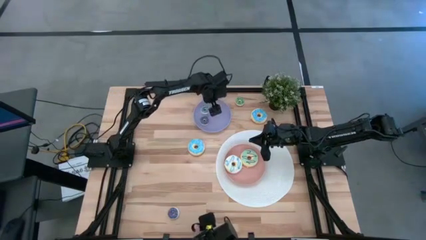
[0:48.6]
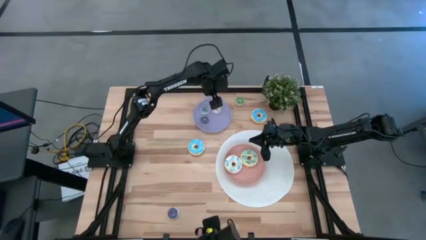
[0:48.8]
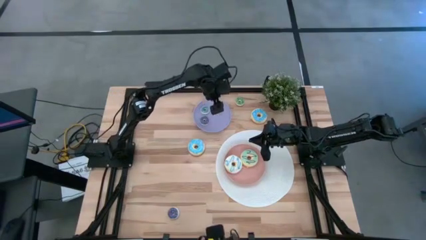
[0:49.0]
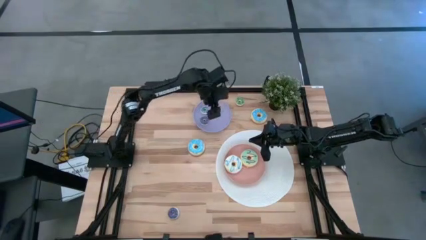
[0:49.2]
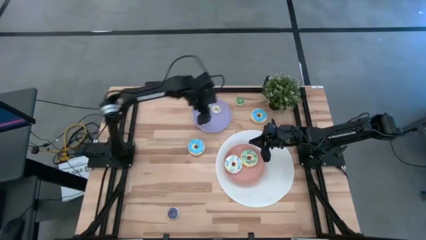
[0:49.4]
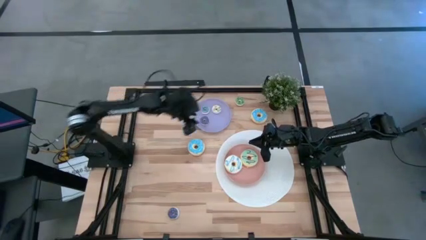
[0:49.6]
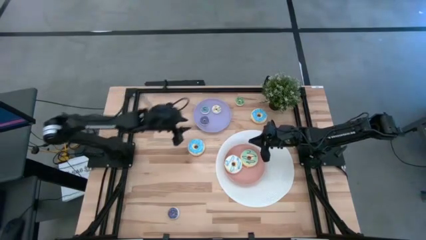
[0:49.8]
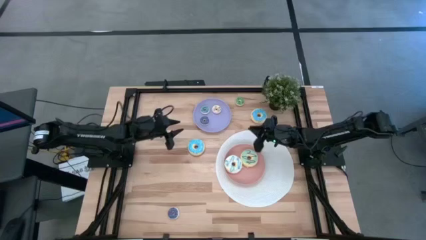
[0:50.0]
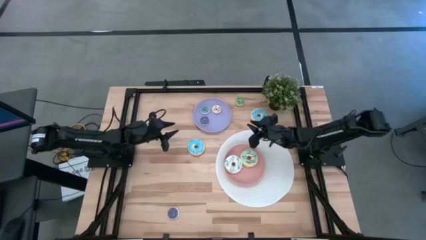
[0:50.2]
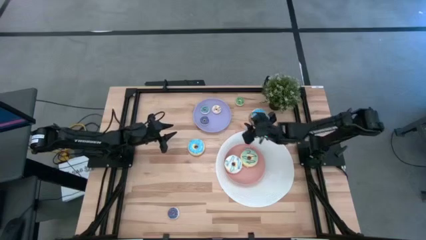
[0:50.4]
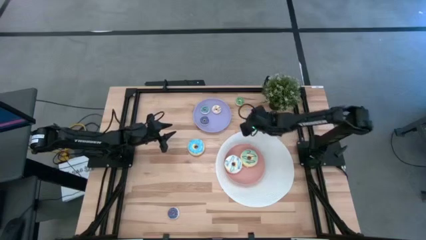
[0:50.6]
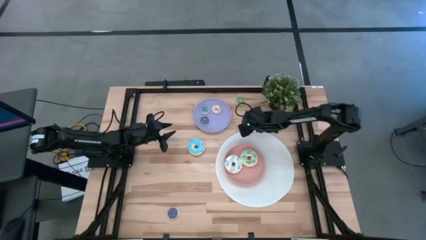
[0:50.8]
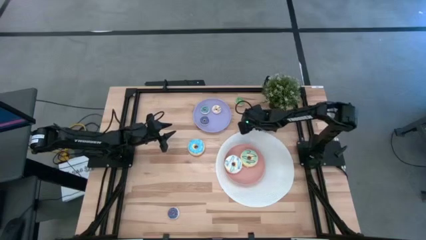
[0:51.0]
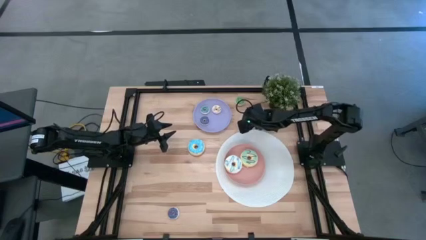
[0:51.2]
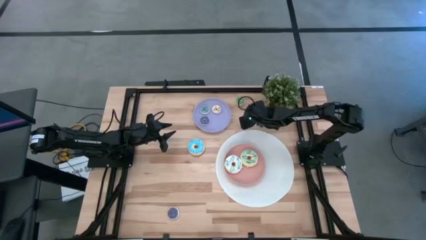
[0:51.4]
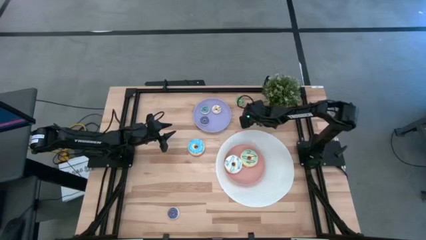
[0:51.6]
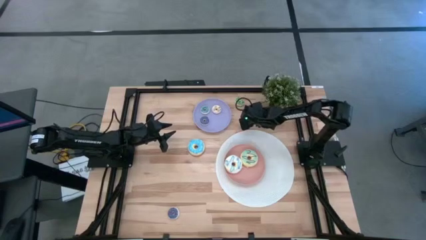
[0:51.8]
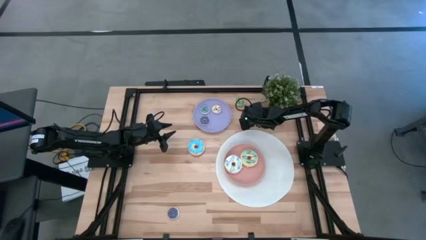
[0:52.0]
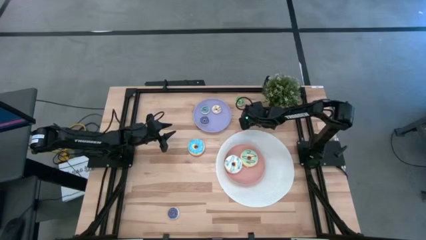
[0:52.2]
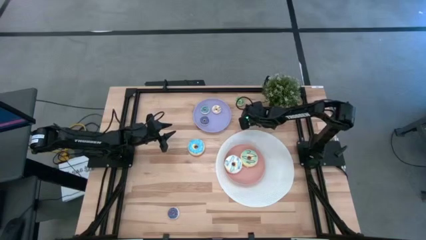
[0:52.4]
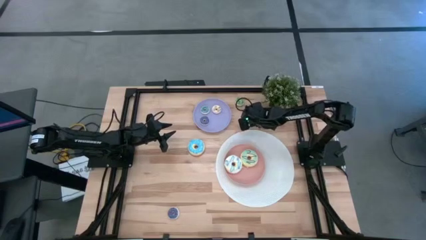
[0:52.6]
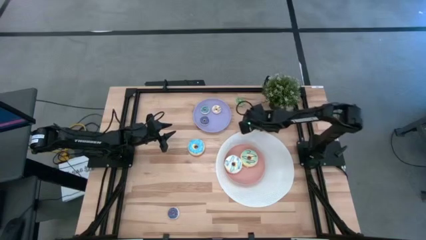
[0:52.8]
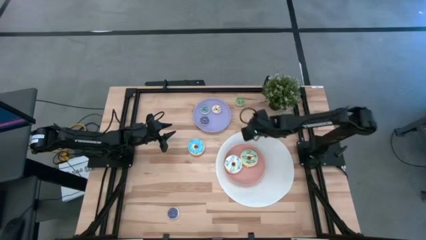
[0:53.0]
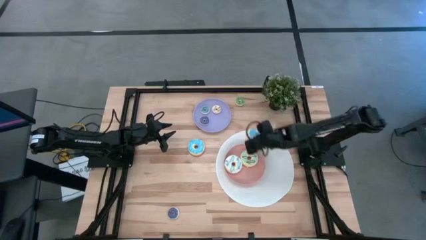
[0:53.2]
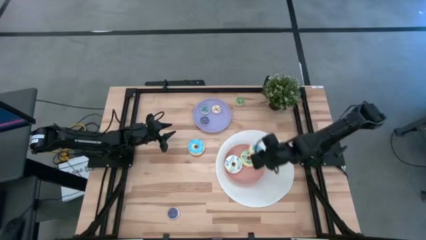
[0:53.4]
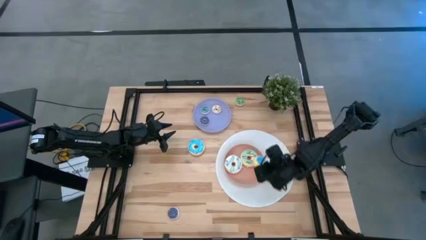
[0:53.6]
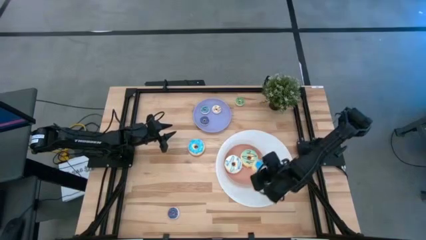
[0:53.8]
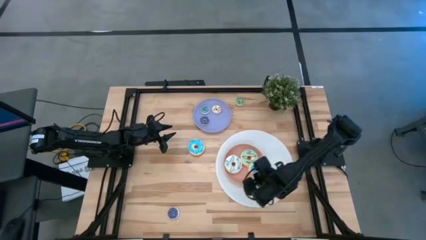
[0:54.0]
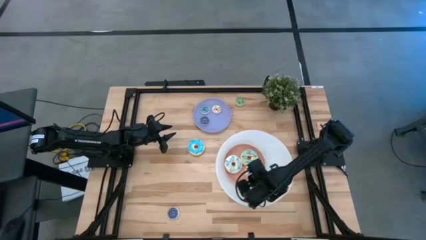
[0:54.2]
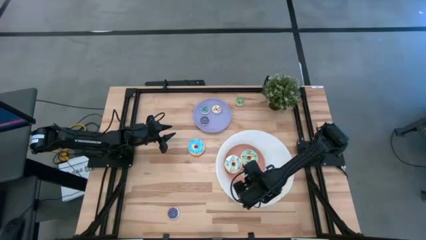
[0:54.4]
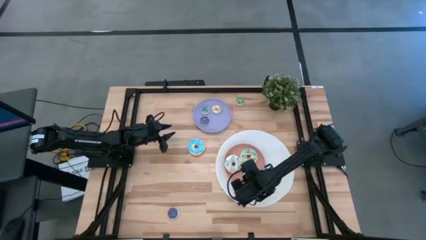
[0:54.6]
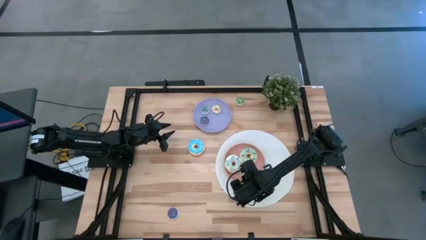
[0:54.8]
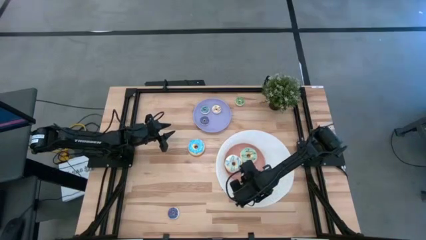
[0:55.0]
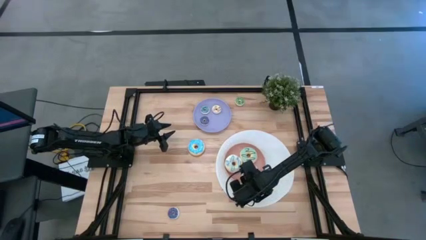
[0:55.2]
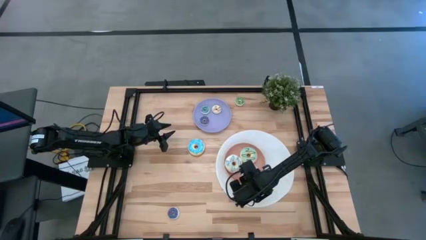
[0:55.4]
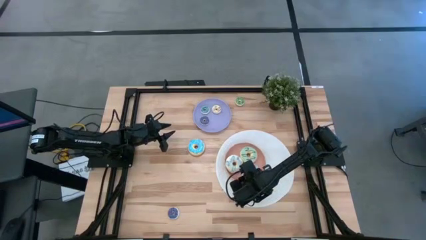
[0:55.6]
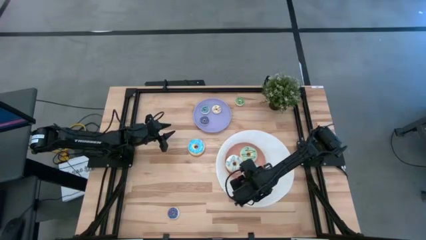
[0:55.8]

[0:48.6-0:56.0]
Task: Pick & Place donuts
Put the right big blue donut on the orange plate

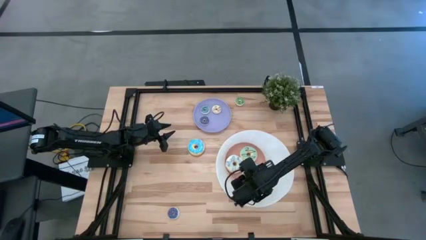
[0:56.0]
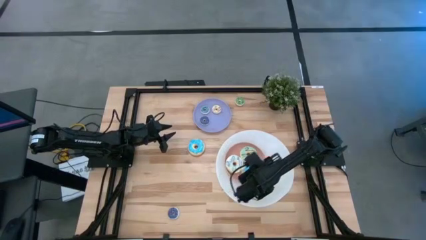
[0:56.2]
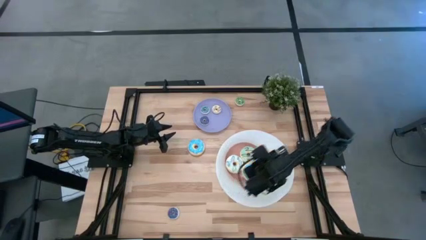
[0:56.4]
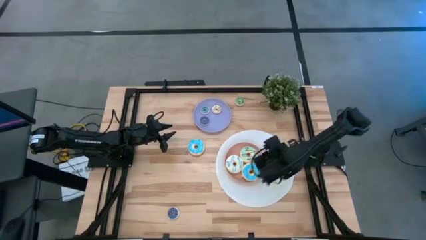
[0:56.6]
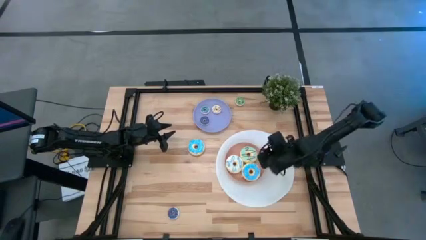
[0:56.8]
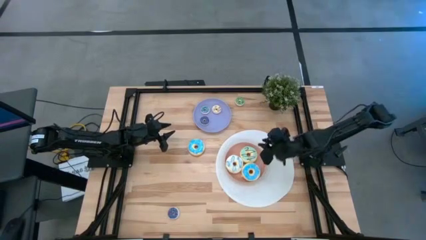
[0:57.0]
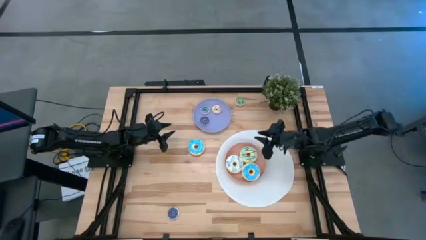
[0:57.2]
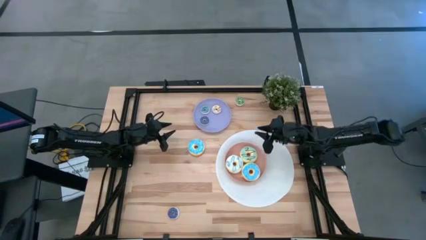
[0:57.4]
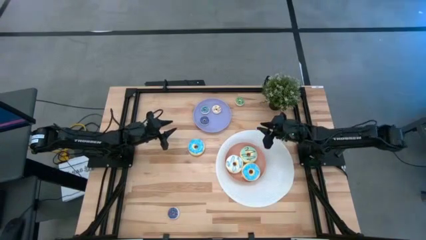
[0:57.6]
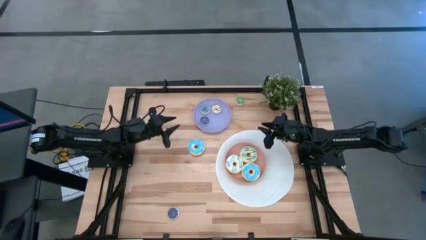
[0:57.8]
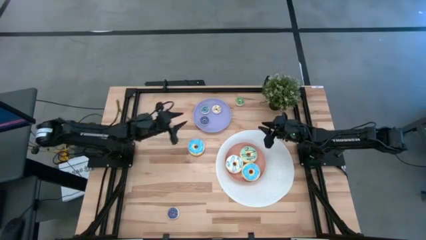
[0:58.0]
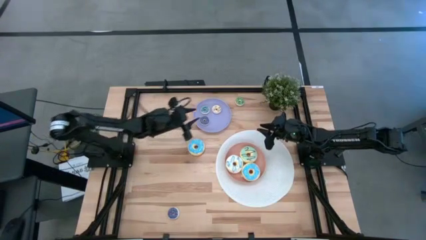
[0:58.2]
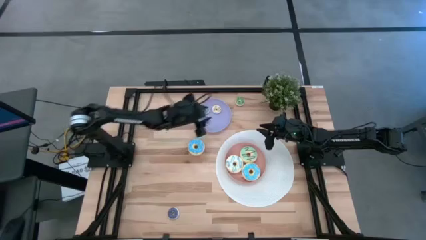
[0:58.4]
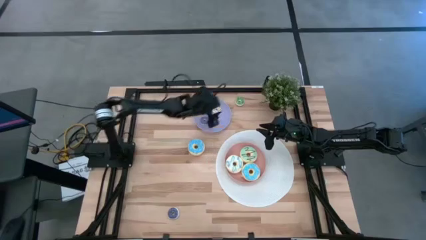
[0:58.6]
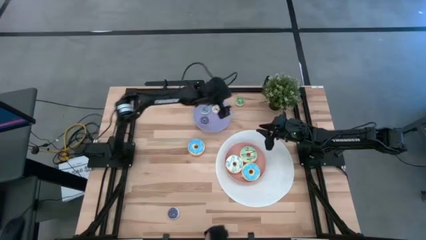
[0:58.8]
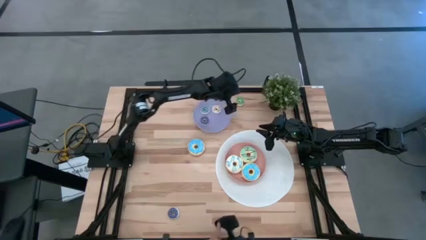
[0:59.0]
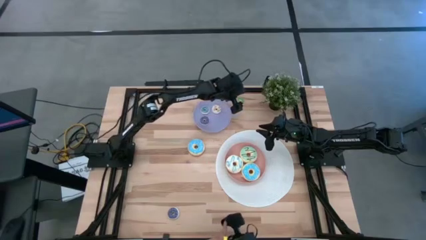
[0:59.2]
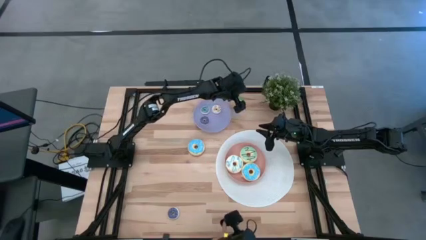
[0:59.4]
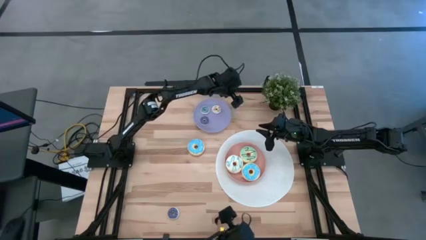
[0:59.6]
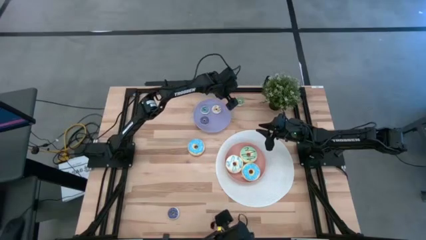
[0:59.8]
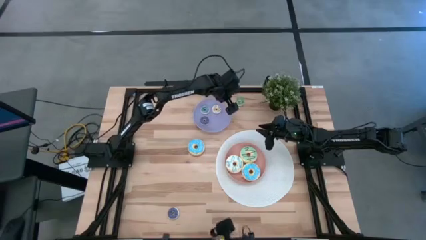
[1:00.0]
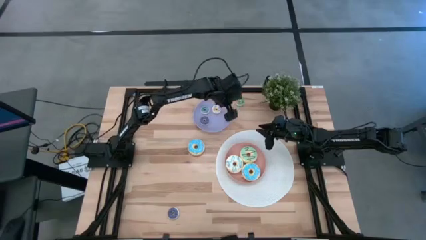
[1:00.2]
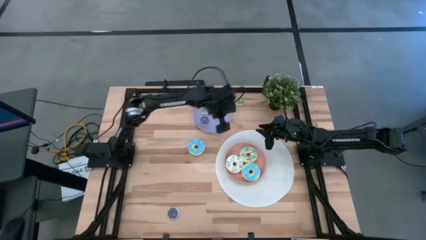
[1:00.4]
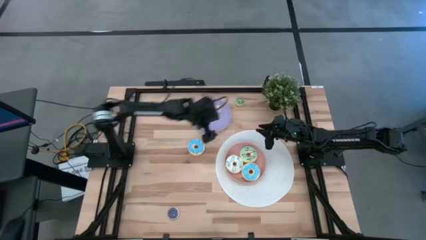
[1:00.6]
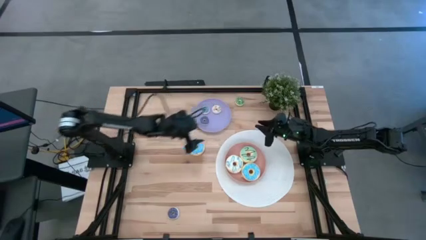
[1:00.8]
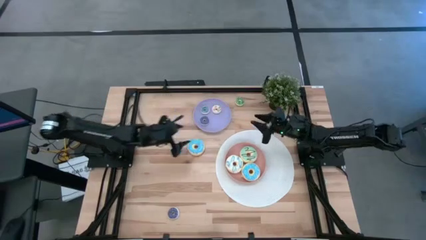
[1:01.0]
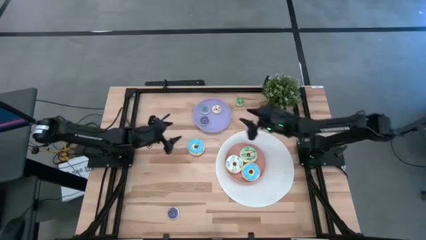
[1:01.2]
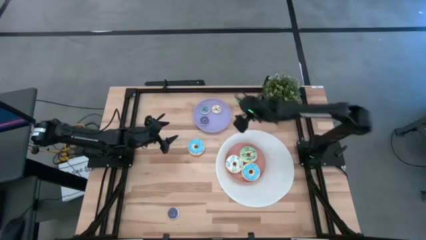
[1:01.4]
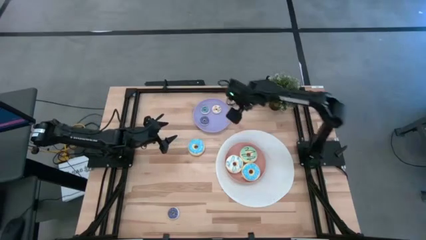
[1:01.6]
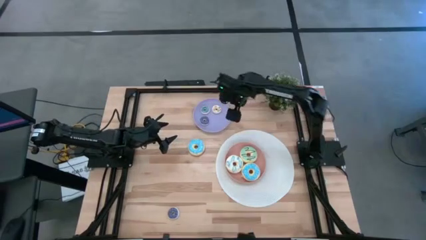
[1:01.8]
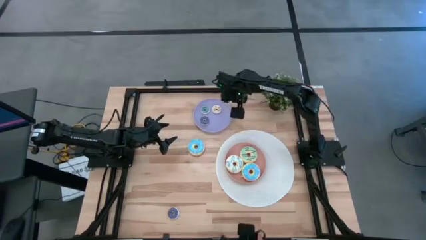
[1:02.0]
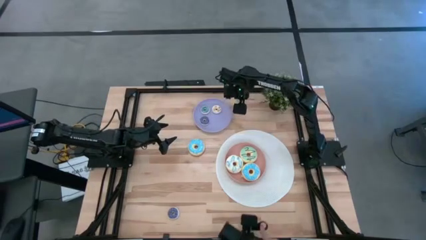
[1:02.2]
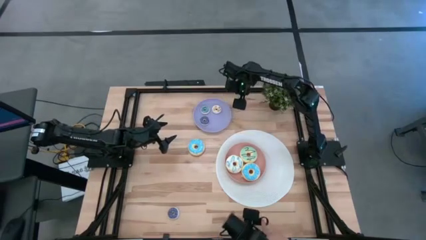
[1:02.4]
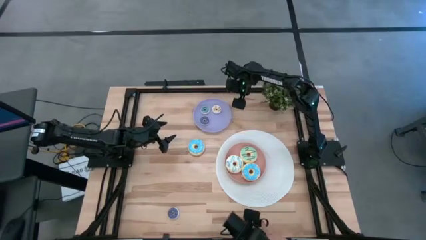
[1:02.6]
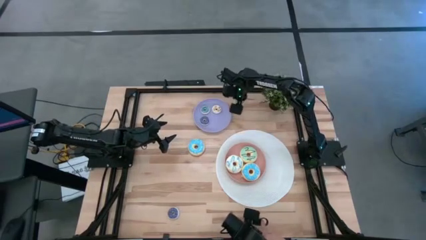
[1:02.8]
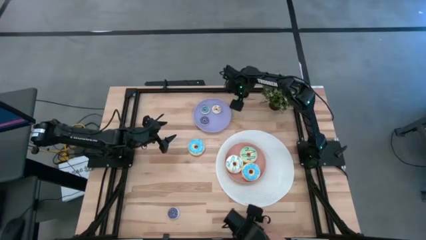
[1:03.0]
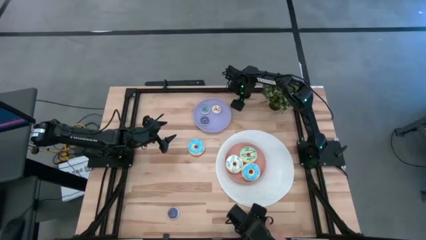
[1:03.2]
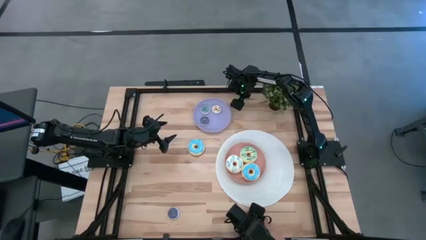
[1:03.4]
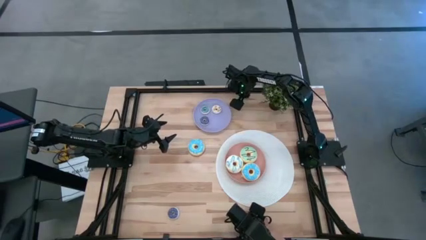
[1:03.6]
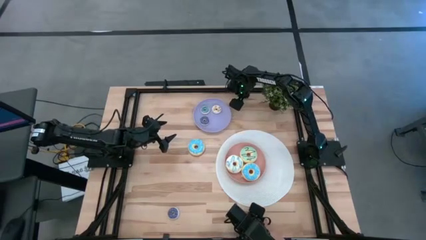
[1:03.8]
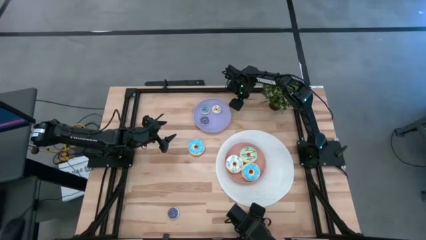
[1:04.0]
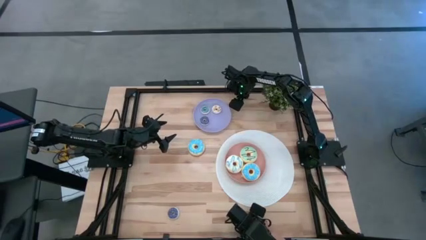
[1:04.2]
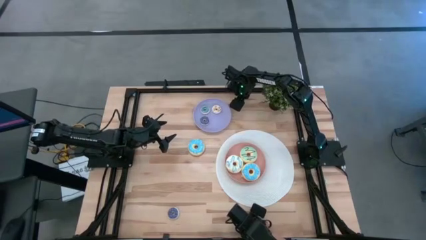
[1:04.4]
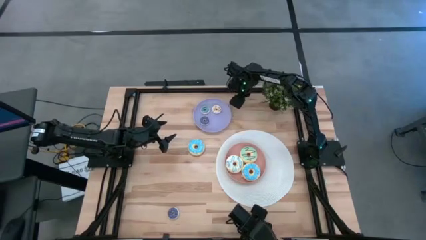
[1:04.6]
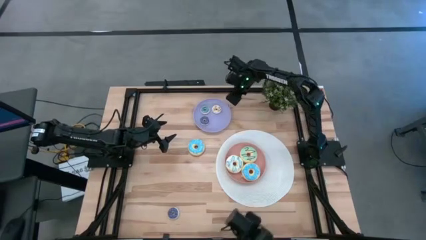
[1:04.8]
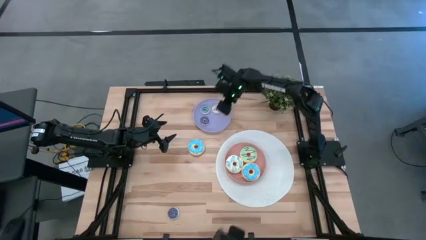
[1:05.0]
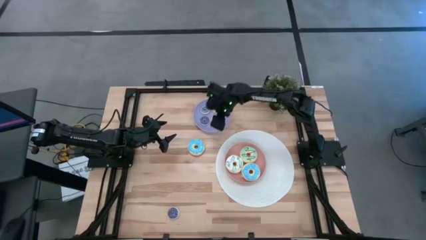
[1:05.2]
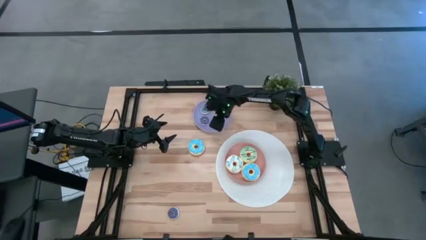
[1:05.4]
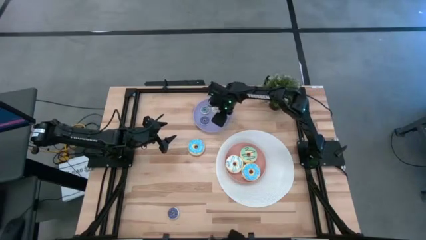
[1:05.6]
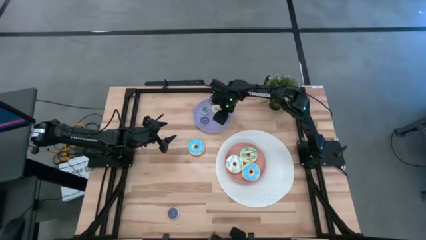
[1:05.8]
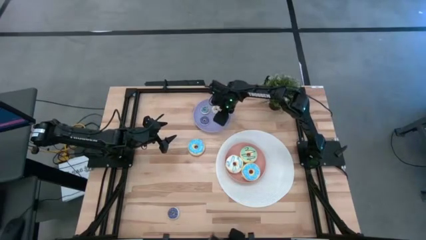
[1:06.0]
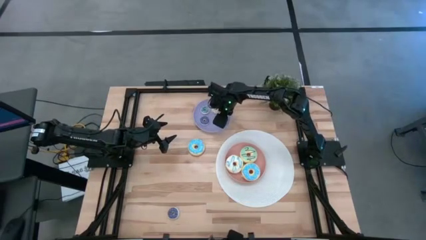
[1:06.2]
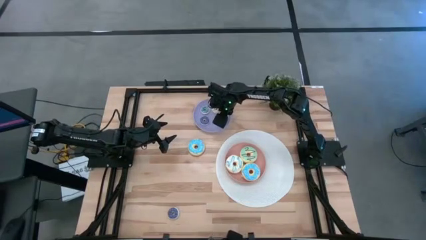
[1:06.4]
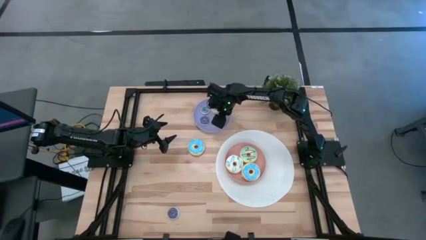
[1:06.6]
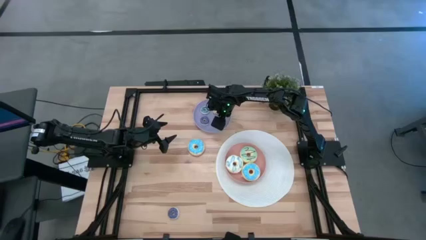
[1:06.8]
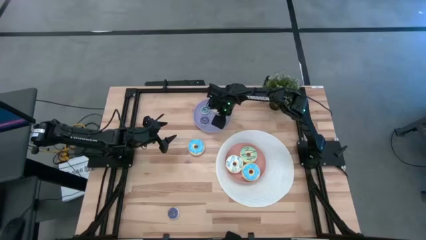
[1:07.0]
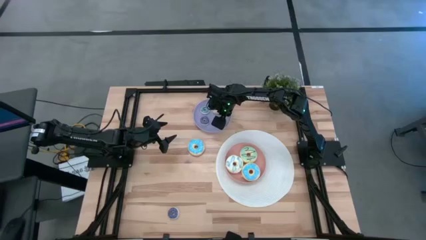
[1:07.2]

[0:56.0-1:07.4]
Put the small green donut on the violet plate
